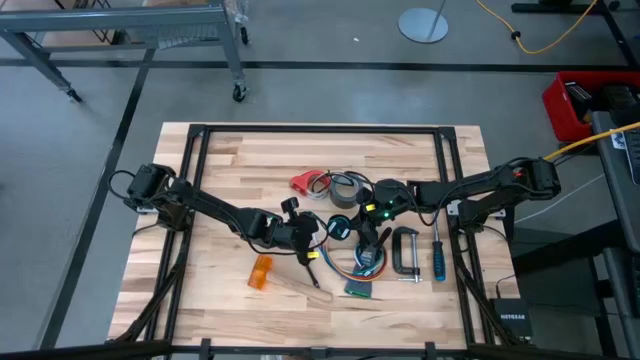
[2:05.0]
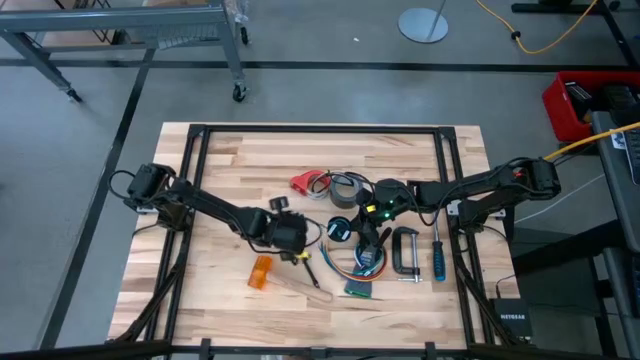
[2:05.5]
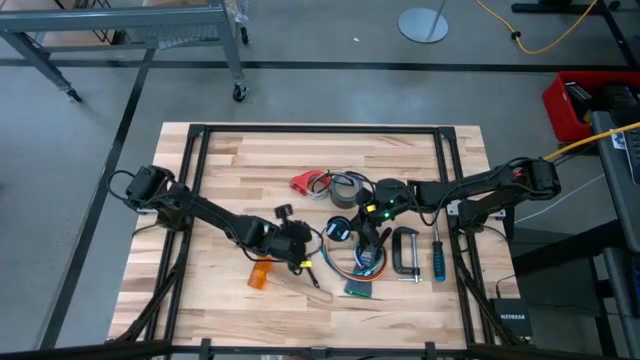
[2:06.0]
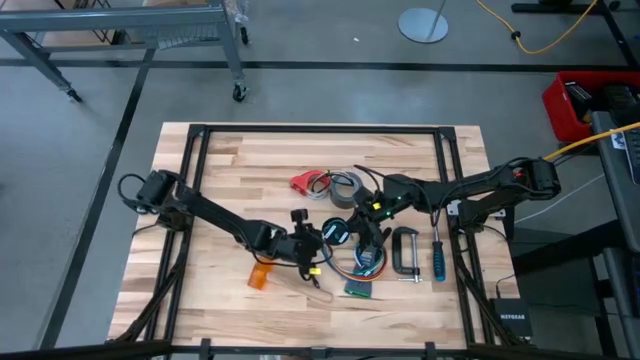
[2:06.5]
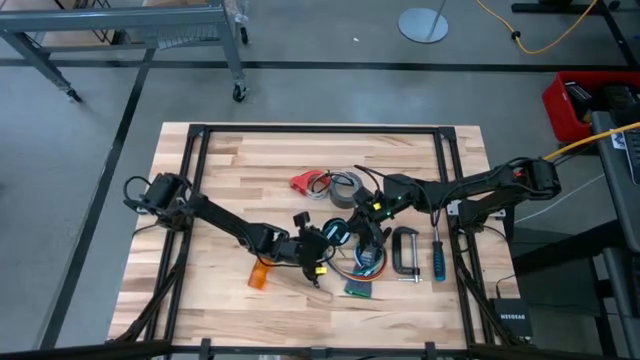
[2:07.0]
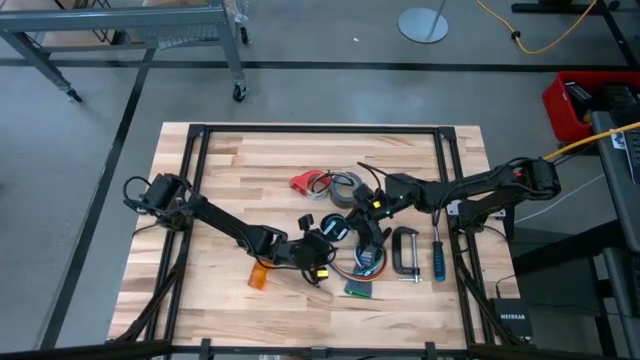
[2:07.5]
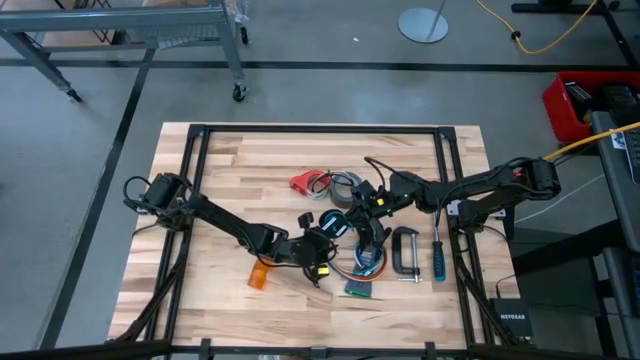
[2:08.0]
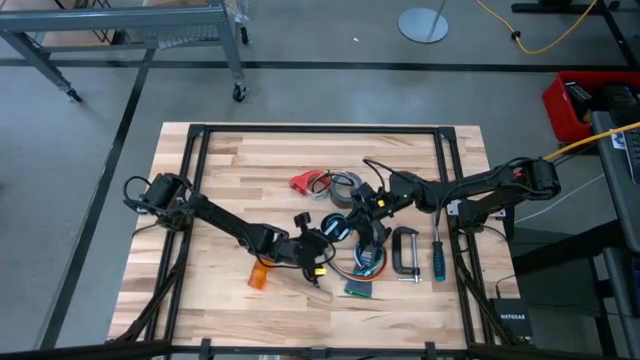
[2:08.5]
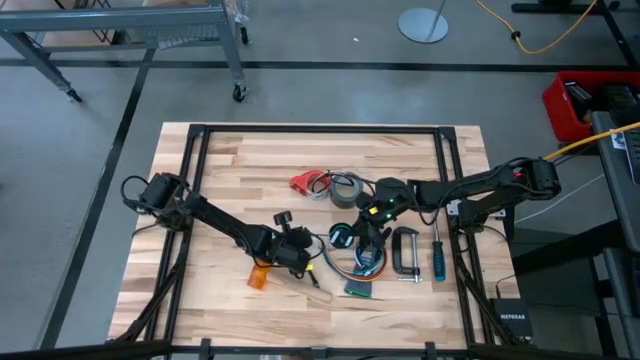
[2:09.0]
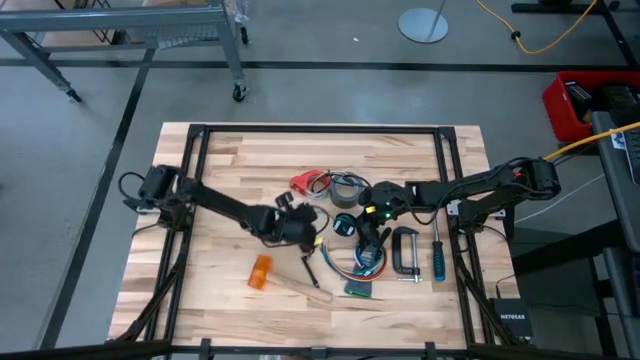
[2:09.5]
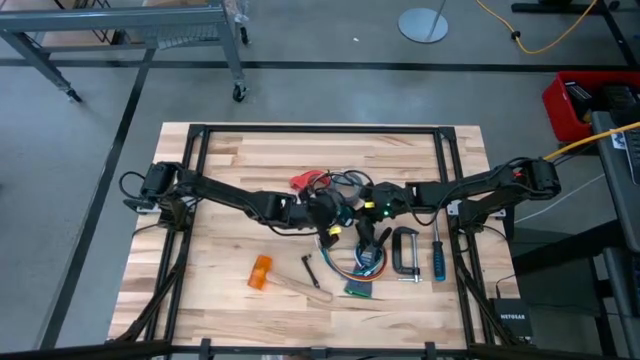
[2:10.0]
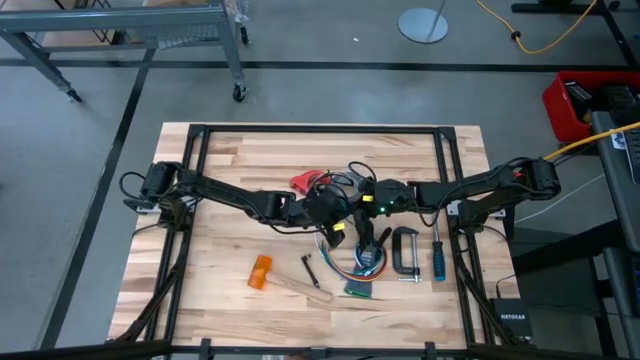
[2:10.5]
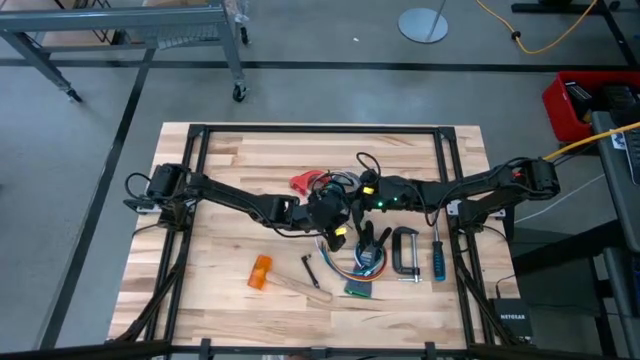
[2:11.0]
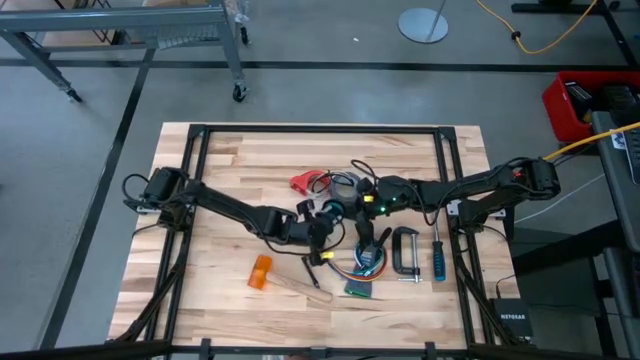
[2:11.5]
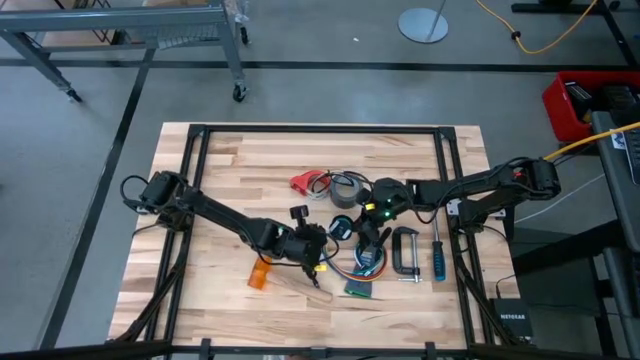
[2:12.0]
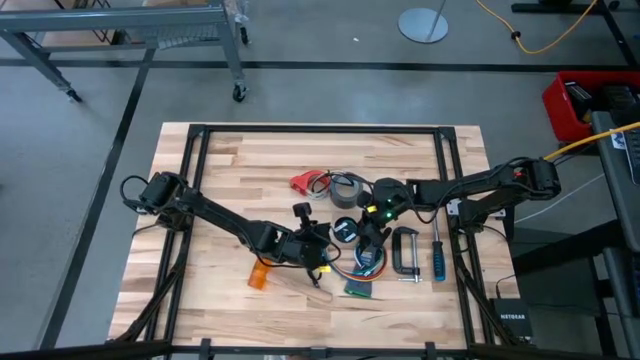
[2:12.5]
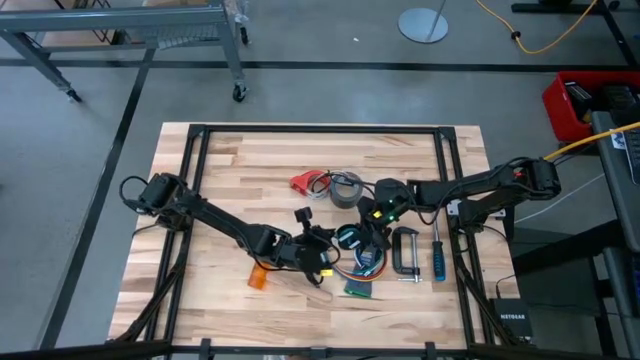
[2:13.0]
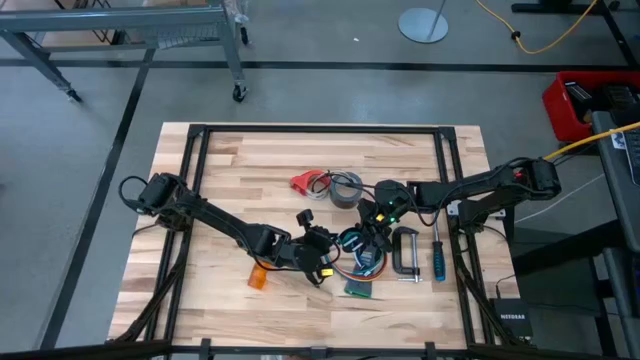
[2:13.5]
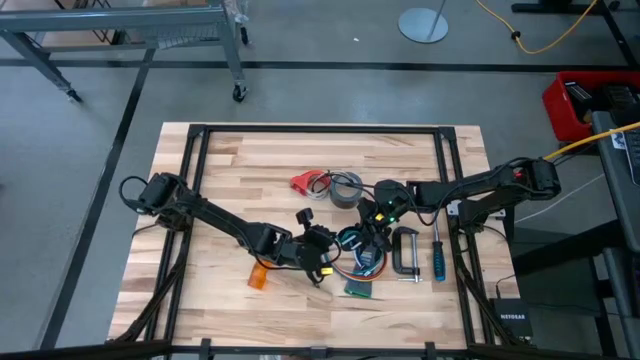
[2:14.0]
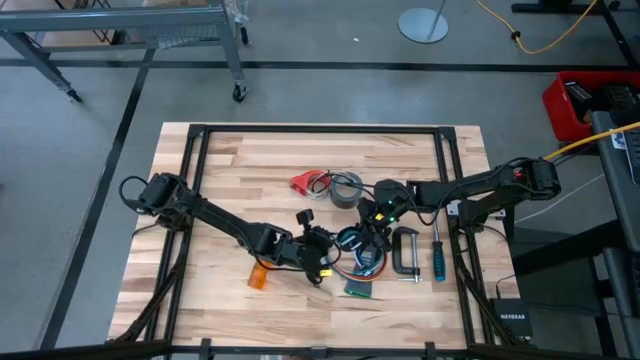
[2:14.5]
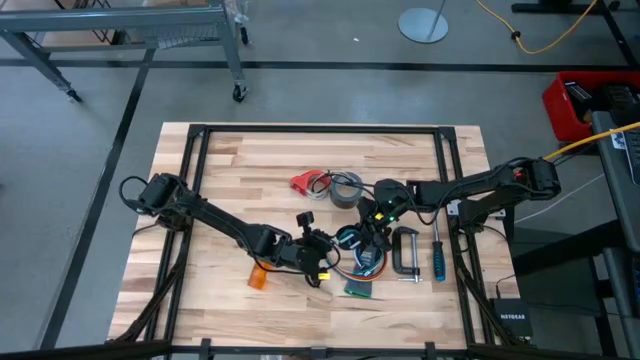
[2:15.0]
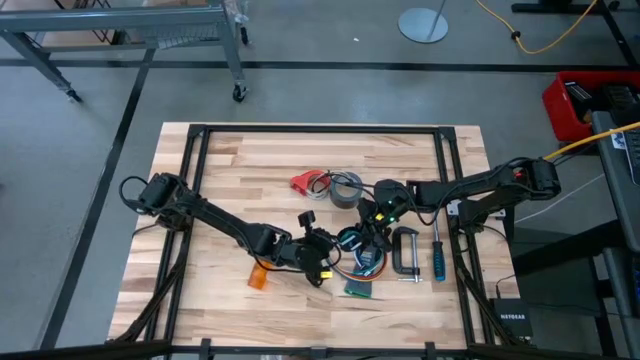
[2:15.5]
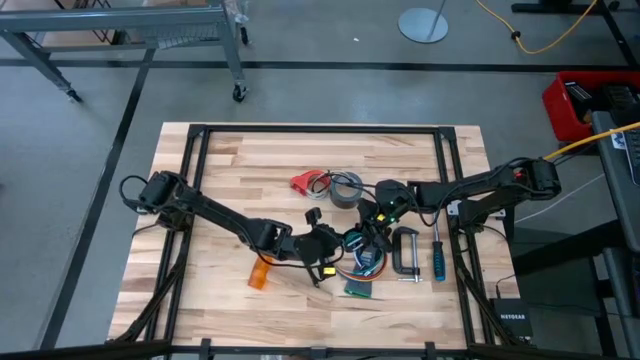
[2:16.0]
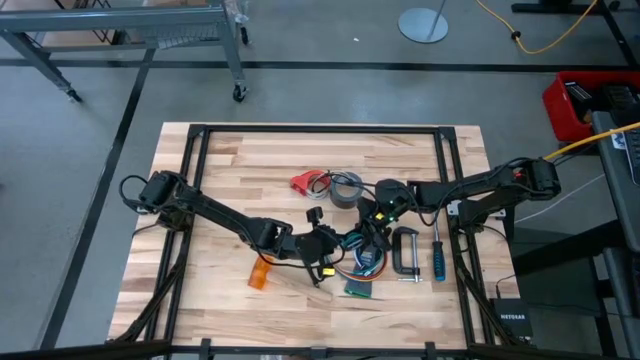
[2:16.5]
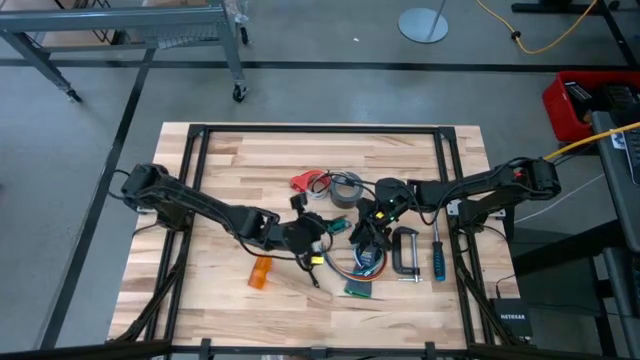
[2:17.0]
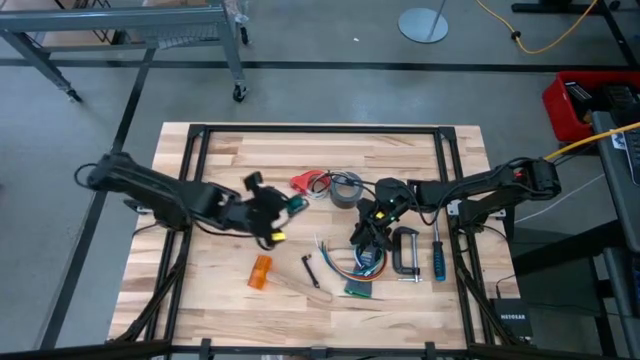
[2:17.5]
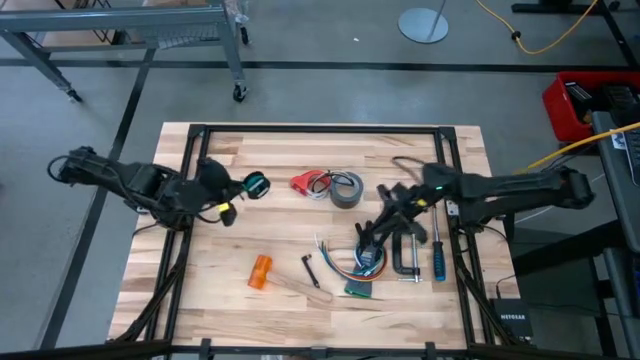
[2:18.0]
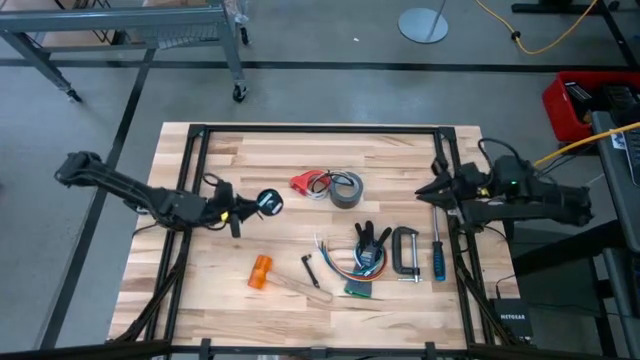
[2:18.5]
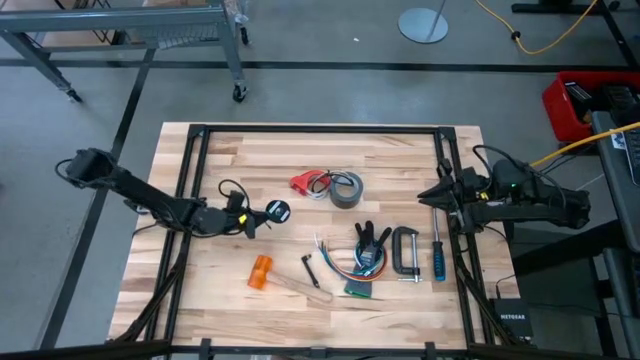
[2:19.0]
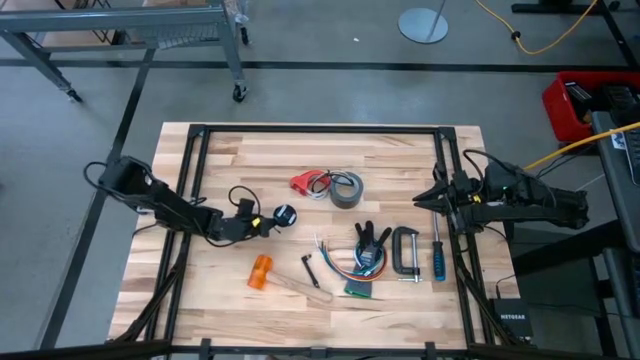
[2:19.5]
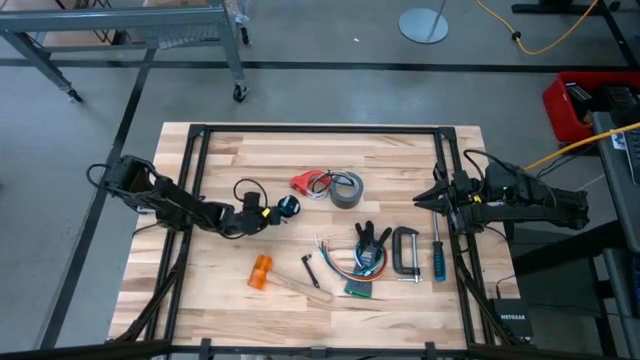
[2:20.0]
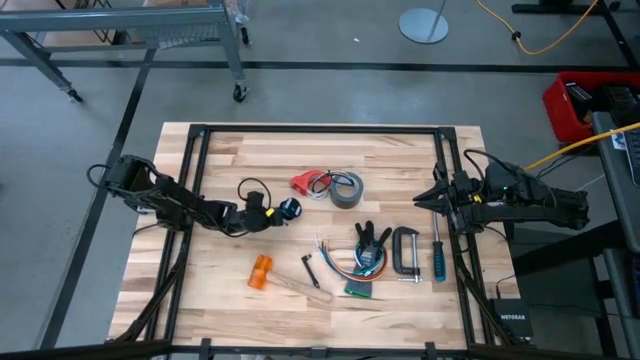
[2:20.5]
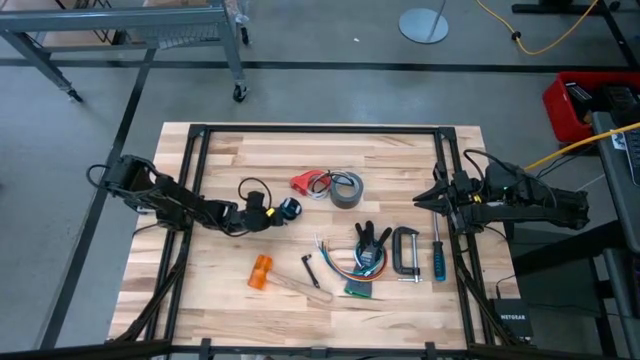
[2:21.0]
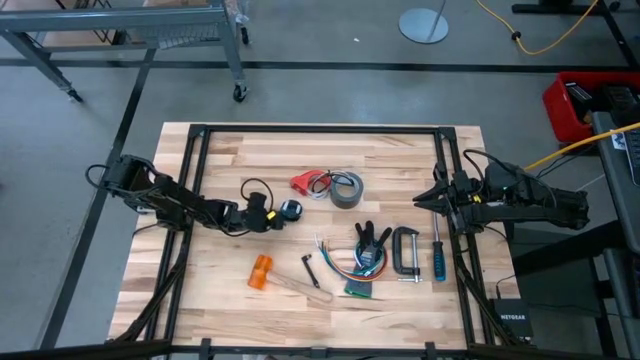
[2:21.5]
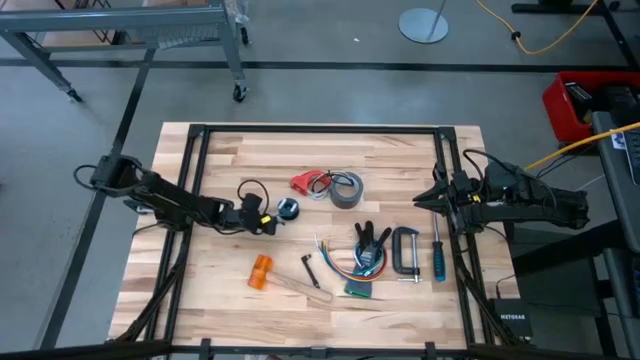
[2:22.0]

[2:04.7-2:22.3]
Task: Coil cords
Coil the blue wire onto the spool

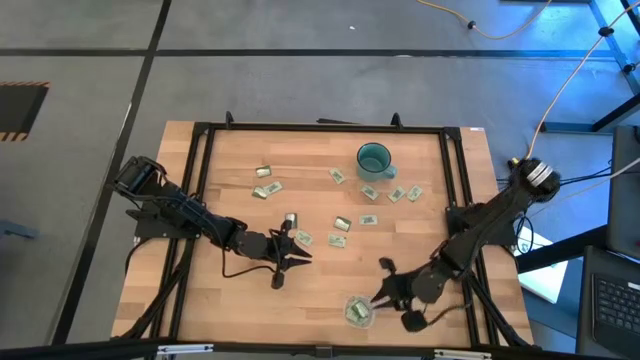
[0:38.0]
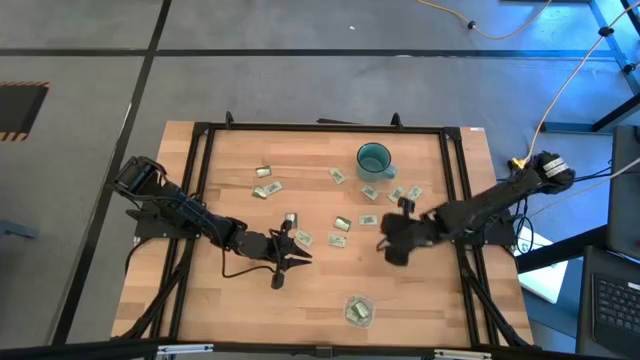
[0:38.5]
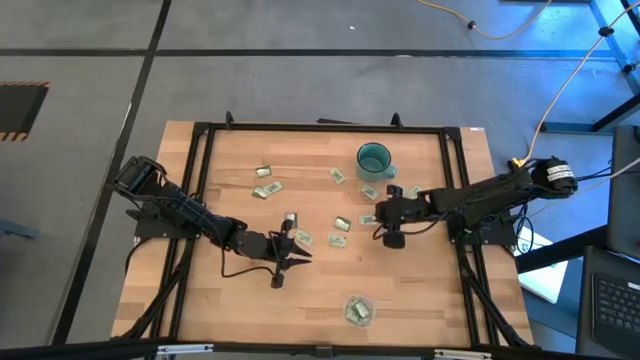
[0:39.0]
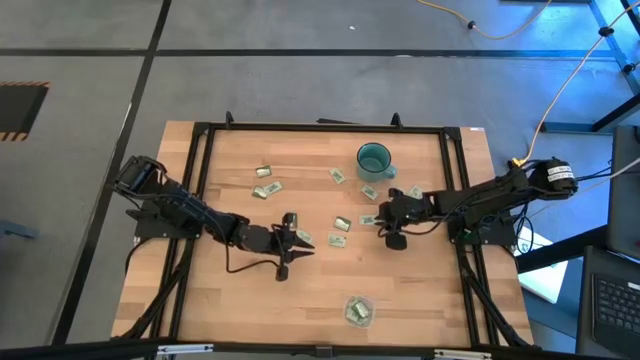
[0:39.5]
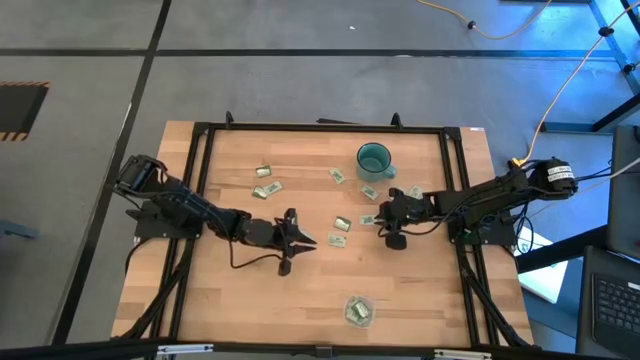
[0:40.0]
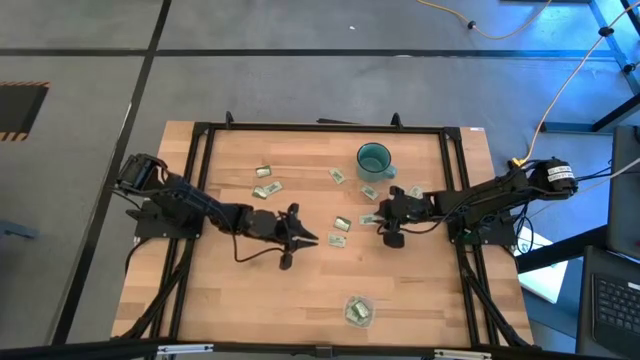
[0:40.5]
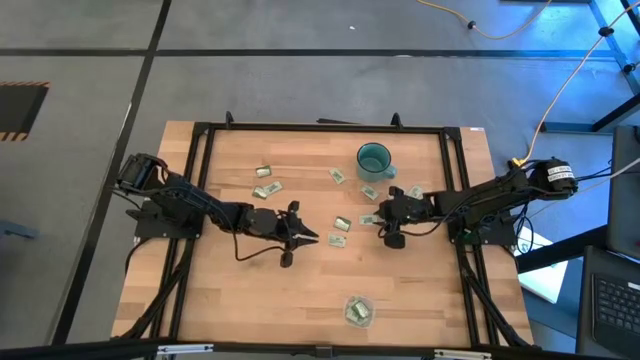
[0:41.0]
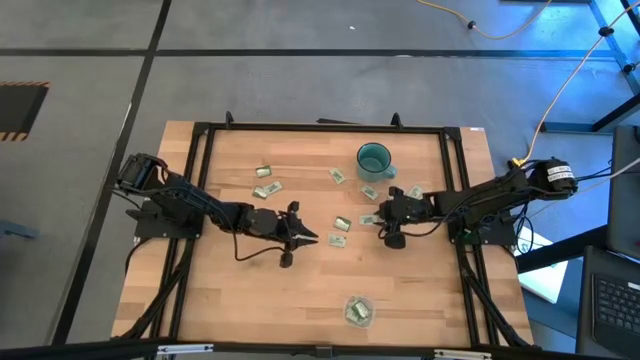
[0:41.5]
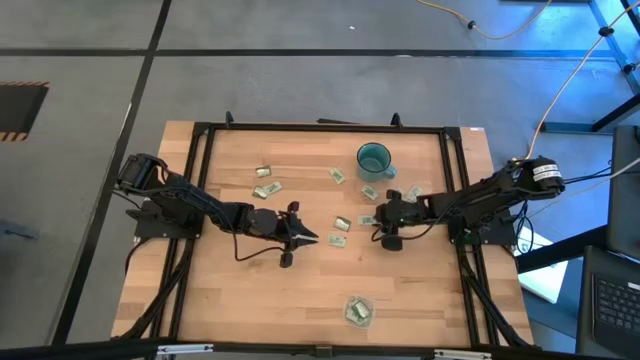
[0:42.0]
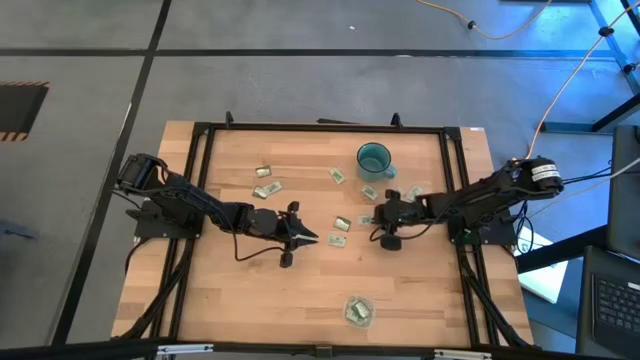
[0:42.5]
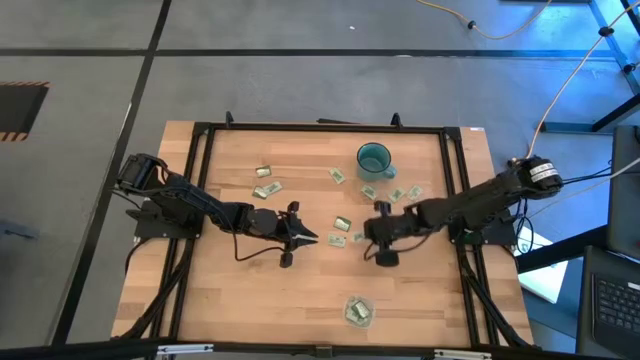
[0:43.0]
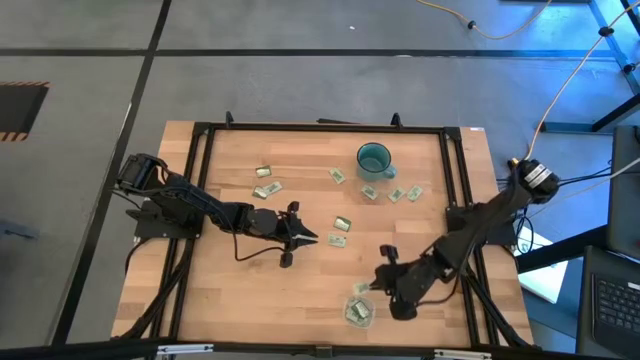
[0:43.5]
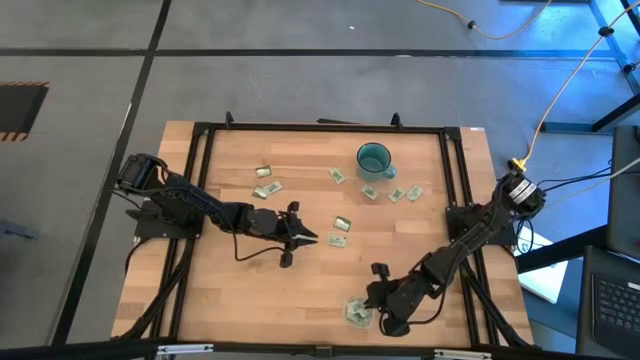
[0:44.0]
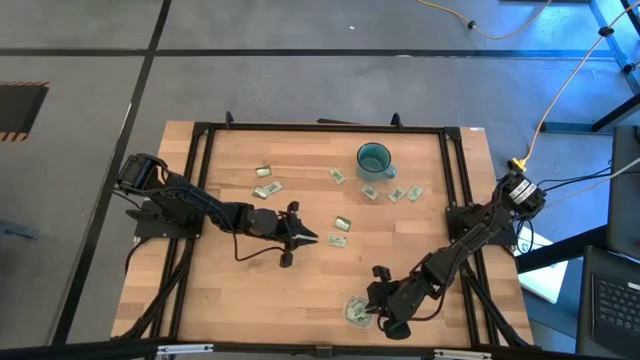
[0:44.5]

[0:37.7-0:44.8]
Task: Pick and place items into bin
Put the light green stevia packet into the transparent bin
